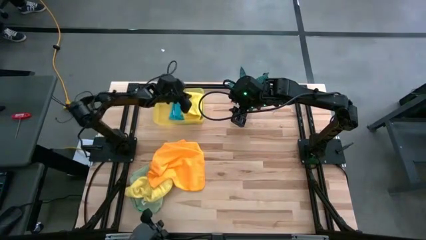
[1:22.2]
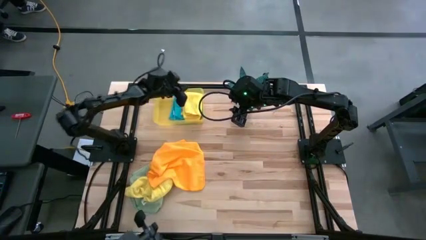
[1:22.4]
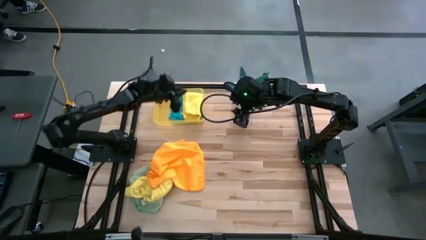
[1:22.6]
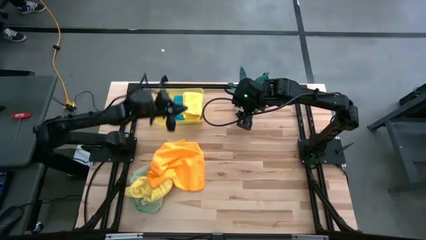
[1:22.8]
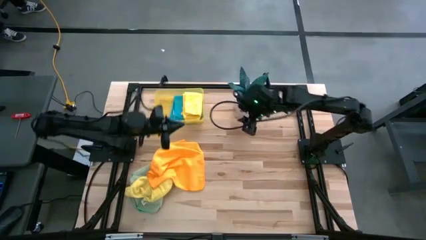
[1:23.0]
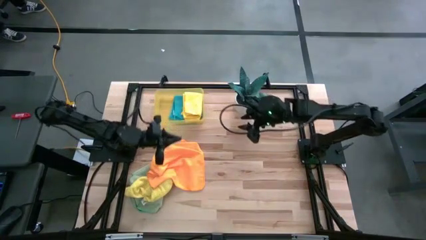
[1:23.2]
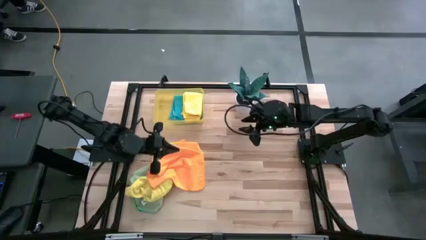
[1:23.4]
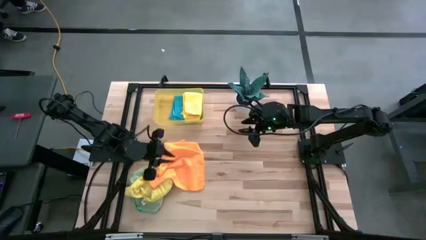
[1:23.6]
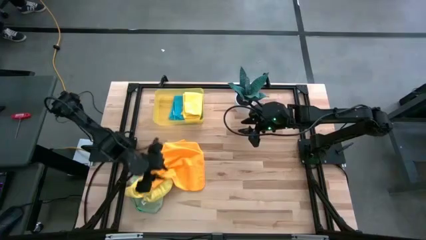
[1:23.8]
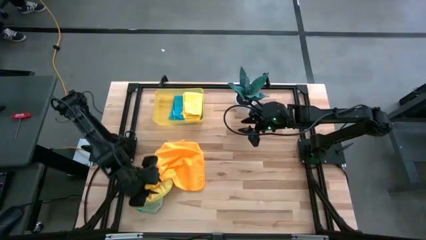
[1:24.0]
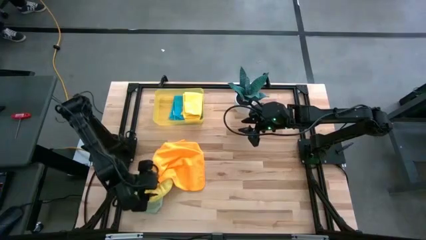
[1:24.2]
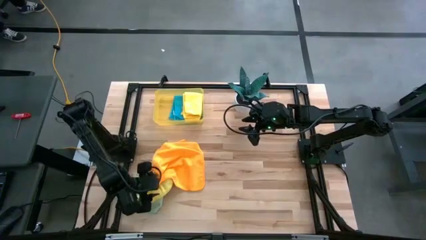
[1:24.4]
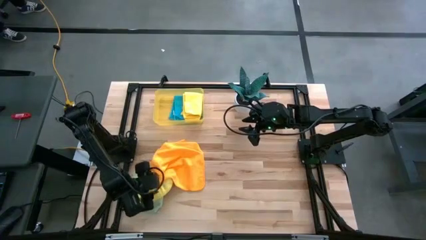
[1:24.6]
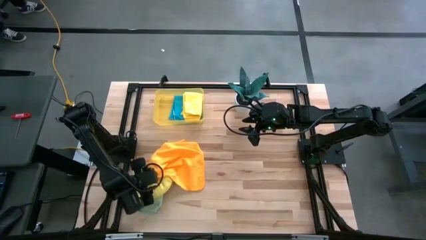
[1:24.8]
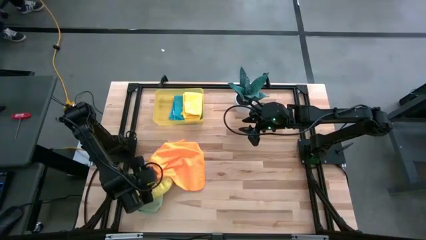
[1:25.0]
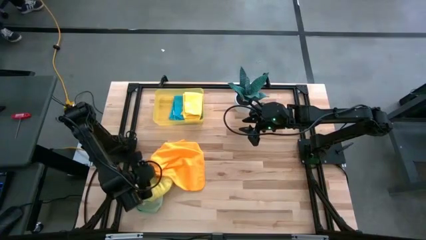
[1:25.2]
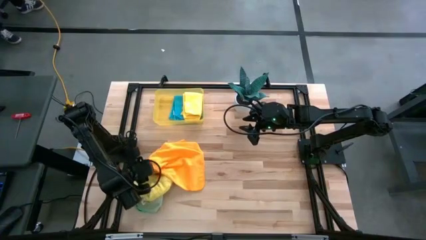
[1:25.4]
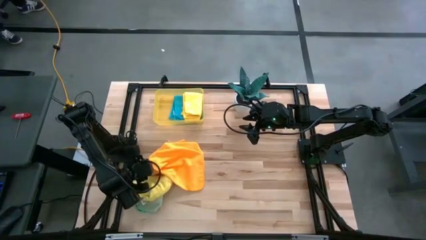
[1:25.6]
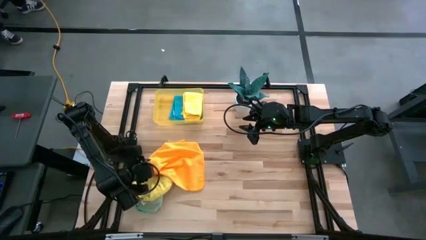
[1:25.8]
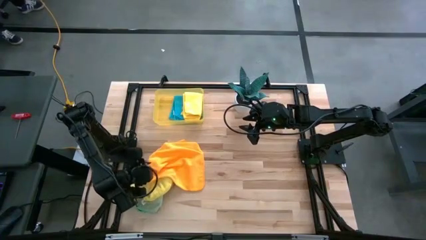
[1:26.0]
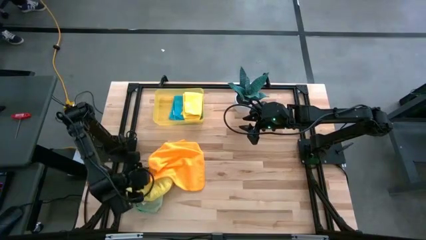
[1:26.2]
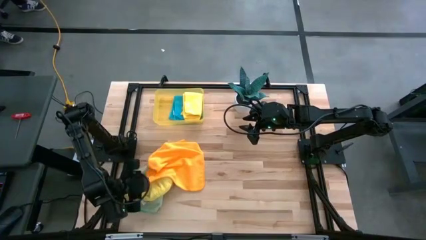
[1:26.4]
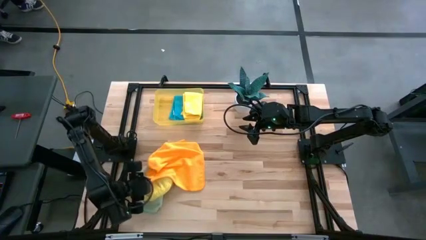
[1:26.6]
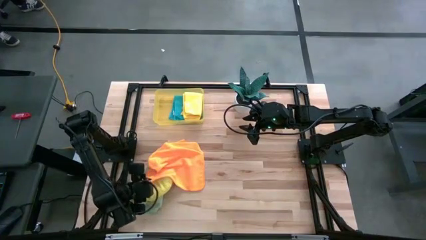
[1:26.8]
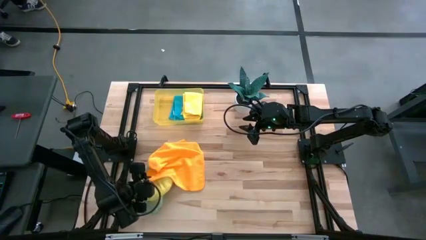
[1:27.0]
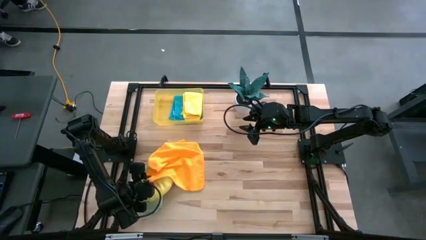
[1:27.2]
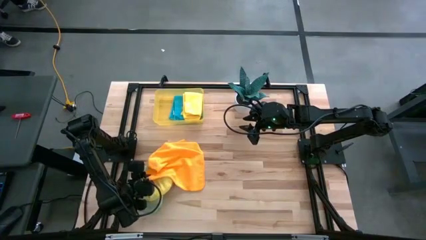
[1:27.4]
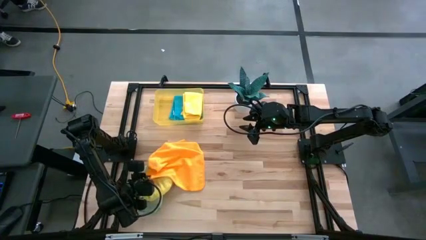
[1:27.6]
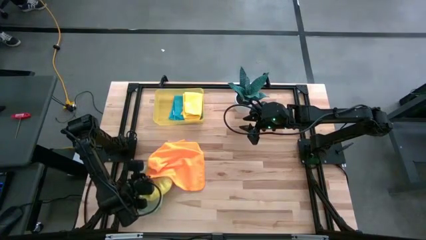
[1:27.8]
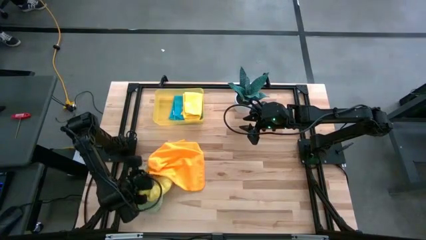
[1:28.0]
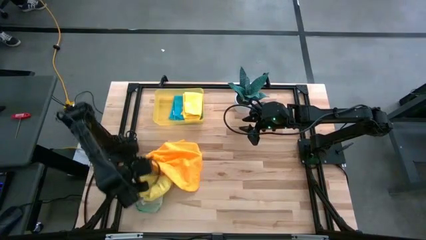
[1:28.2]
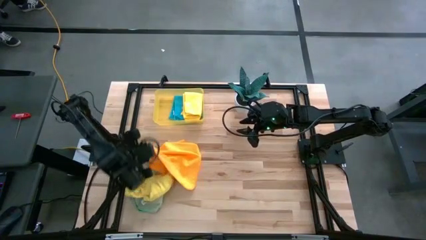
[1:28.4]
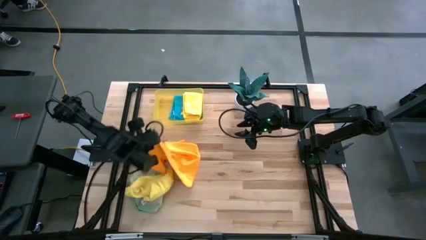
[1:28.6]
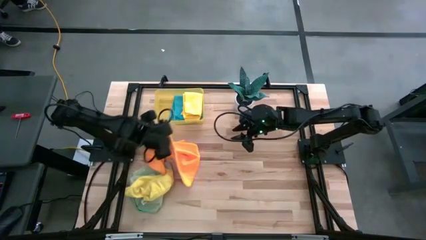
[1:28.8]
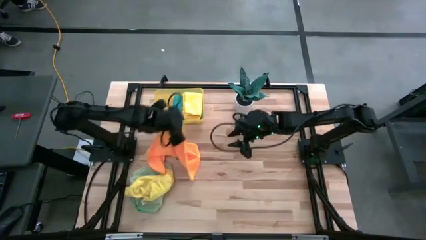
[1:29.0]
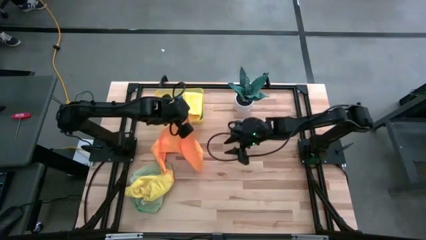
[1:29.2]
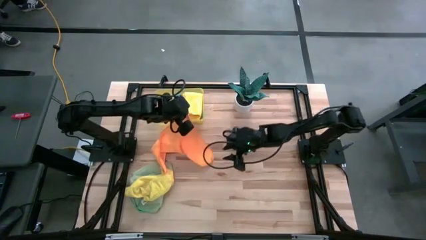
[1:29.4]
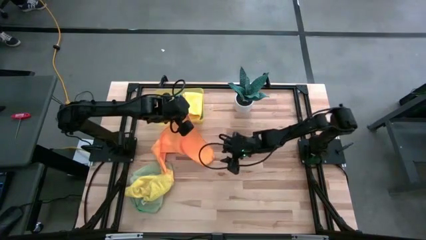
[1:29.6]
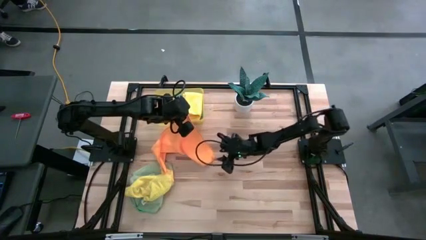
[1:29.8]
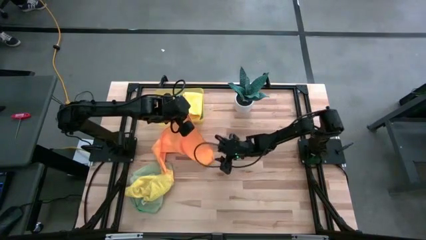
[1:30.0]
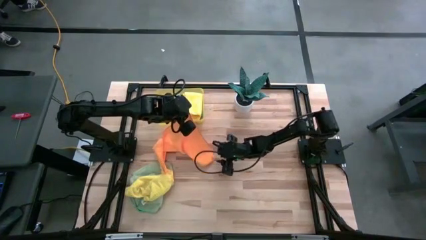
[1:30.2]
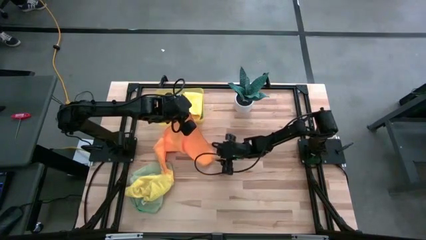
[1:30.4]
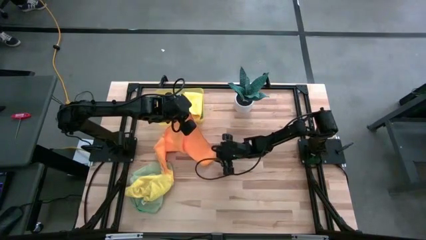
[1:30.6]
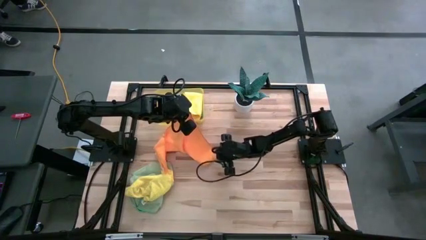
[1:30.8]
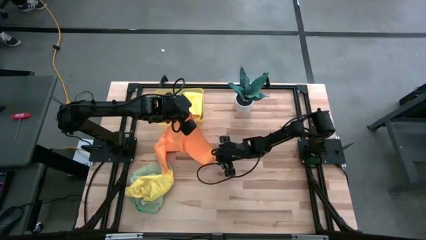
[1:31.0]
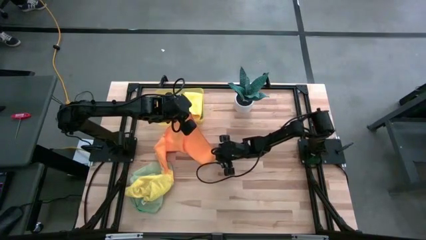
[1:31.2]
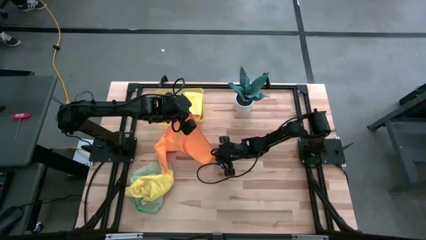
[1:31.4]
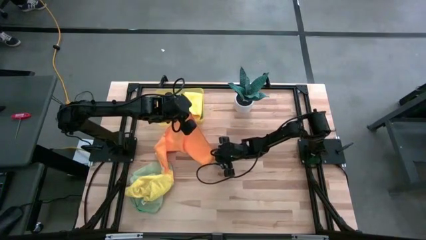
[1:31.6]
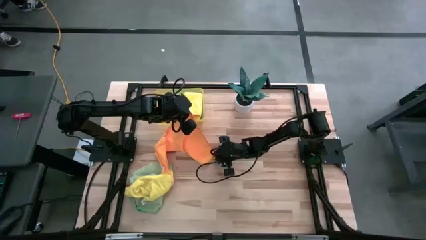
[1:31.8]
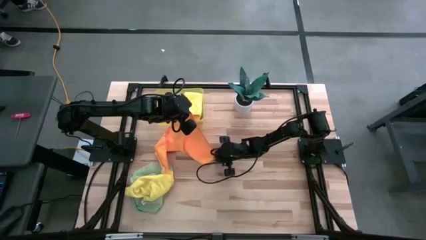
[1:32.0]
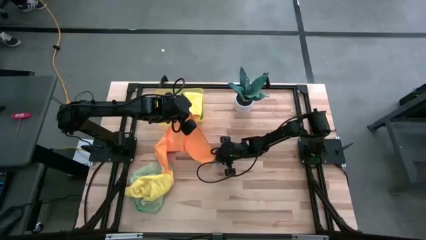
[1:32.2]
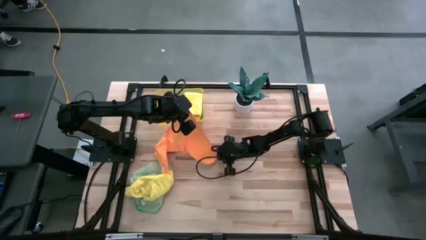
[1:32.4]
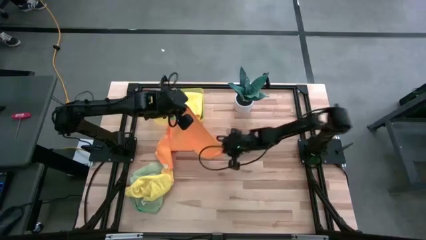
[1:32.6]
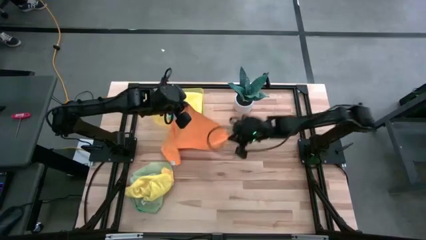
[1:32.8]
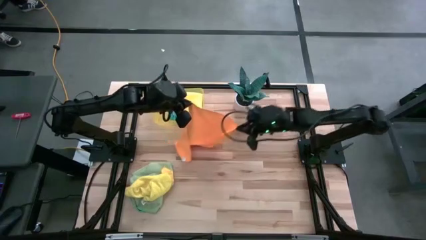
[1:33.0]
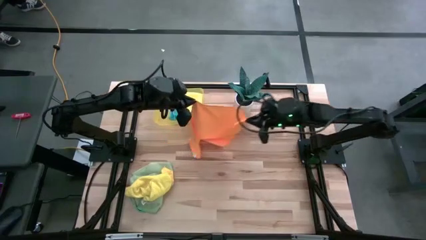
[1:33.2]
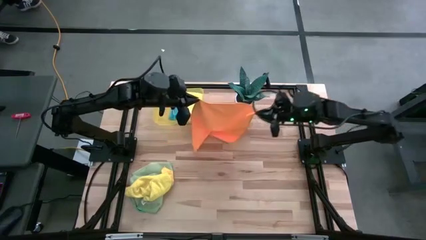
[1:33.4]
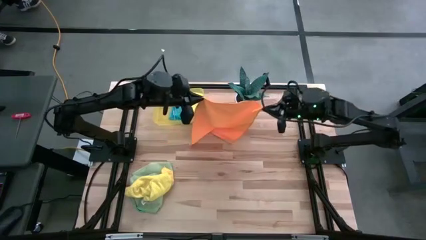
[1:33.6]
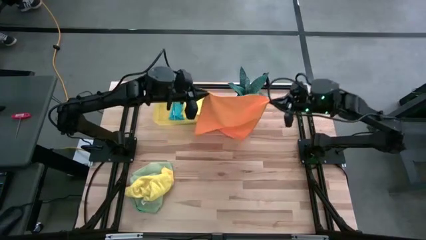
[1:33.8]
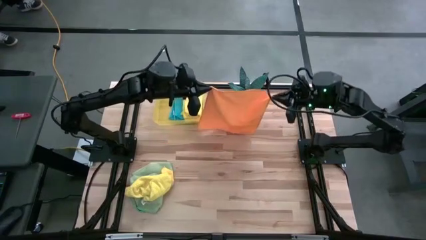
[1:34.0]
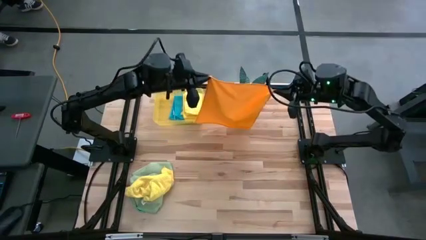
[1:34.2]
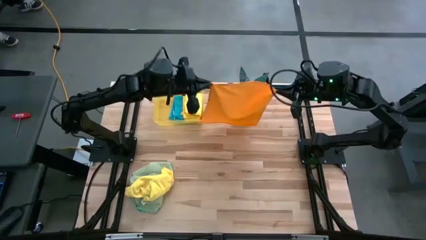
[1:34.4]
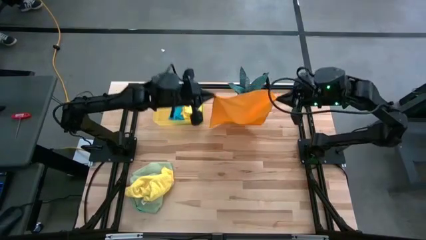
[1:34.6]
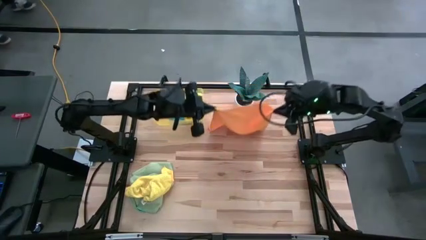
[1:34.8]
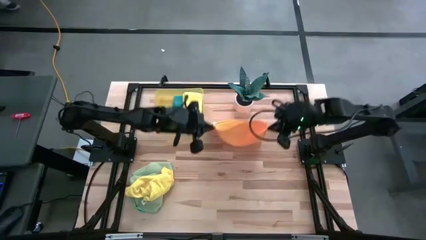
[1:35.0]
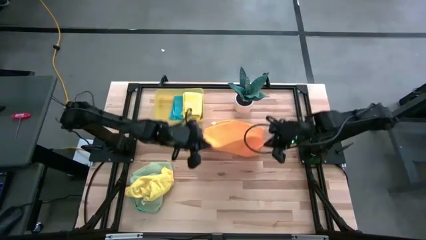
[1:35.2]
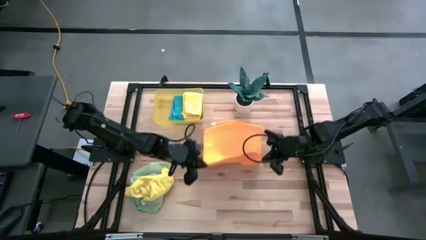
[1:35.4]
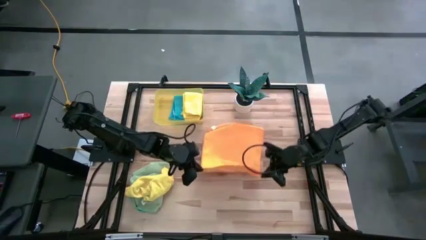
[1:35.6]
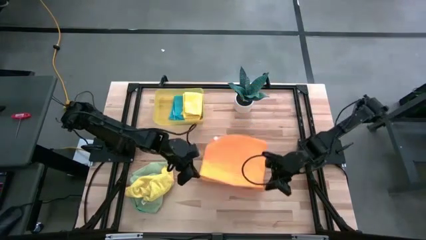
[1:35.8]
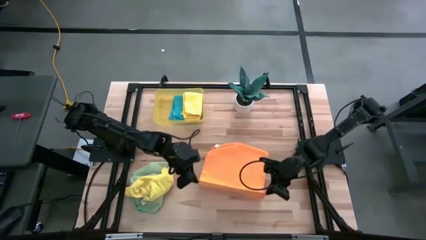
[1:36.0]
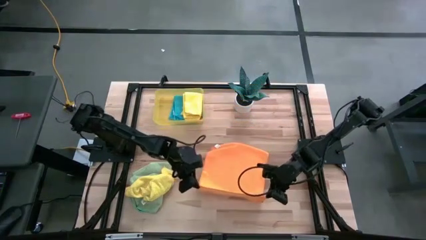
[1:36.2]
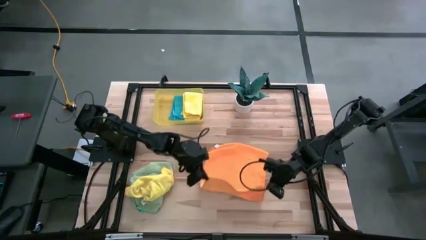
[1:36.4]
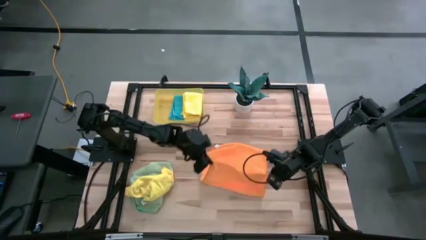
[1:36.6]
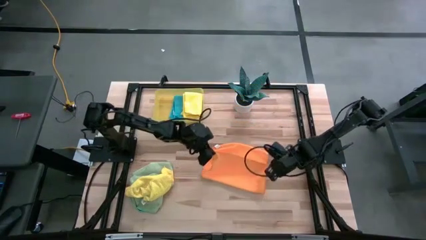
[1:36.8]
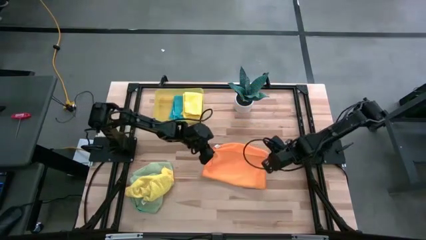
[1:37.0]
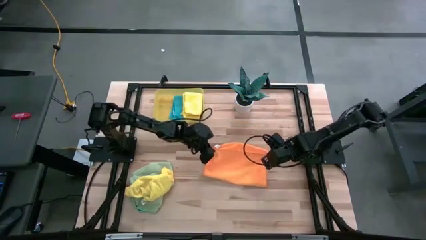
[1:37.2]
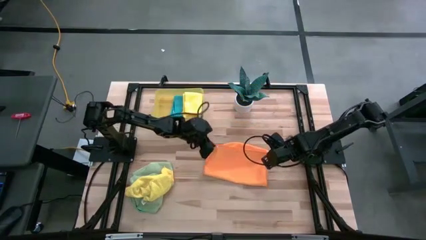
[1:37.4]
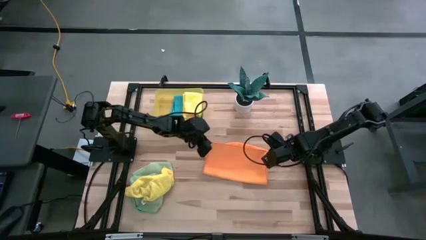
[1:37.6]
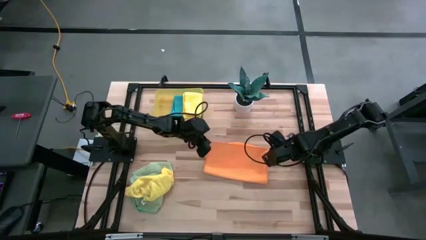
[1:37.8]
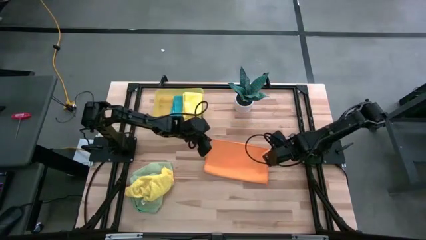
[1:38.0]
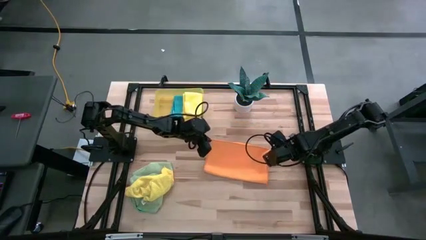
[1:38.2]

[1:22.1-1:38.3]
Task: Fold microfiber towels
Fold the orange microfiber cloth
